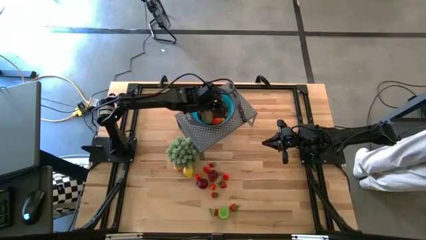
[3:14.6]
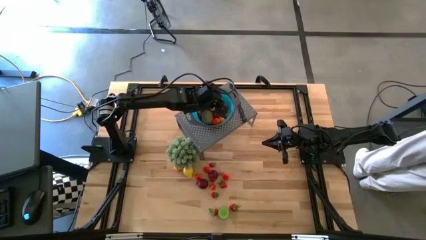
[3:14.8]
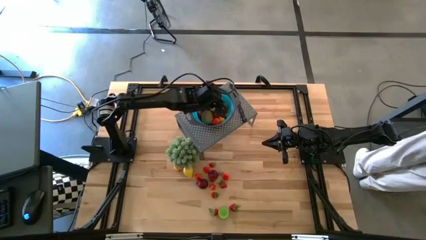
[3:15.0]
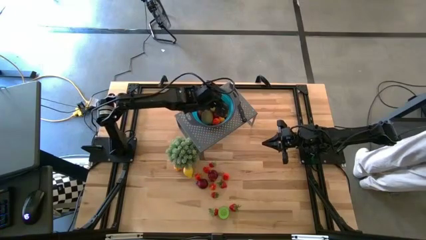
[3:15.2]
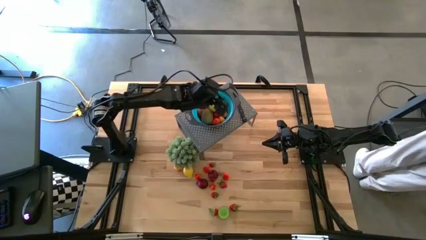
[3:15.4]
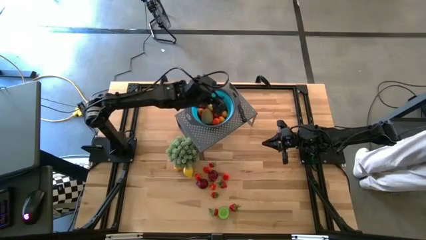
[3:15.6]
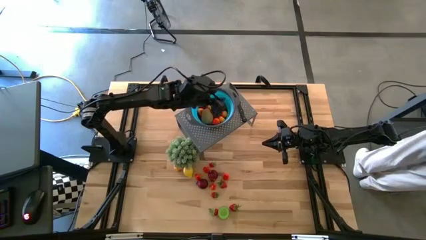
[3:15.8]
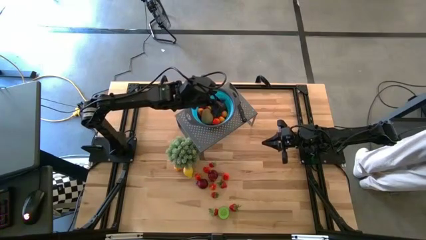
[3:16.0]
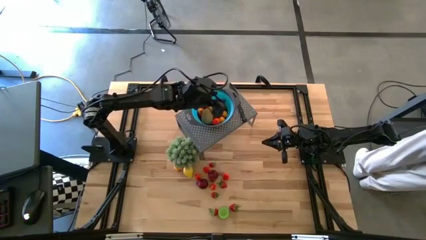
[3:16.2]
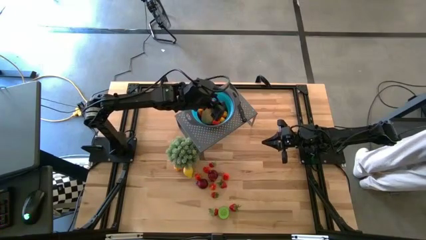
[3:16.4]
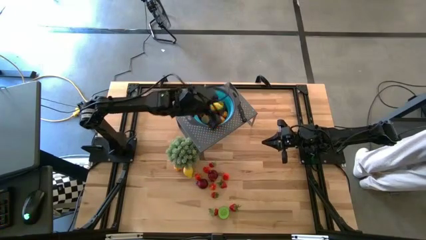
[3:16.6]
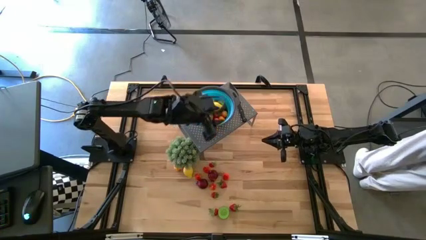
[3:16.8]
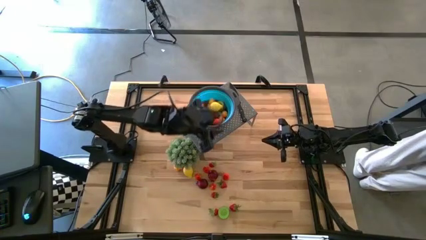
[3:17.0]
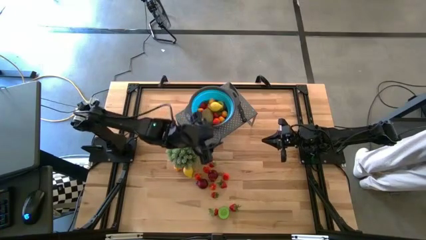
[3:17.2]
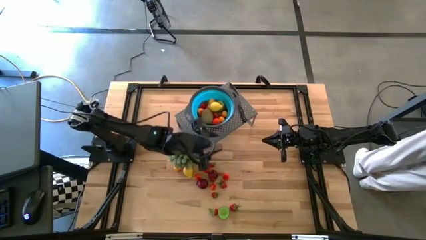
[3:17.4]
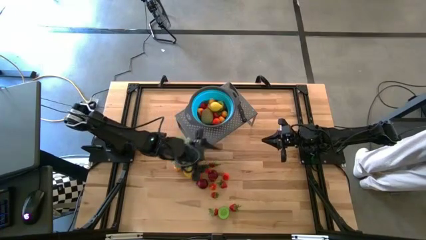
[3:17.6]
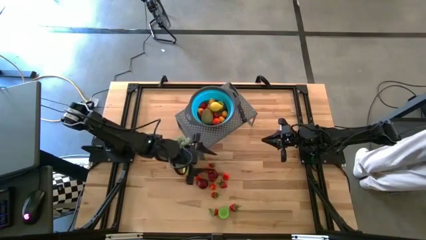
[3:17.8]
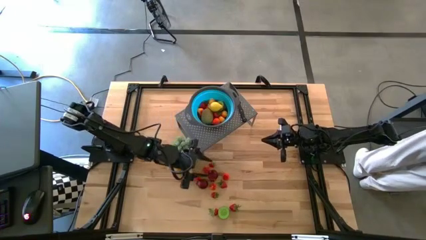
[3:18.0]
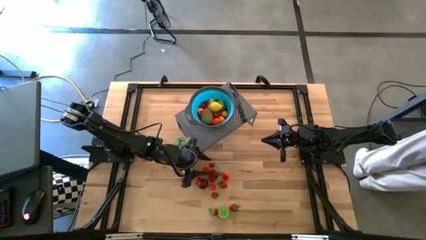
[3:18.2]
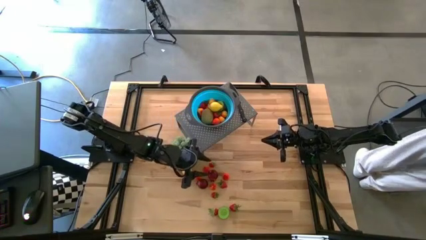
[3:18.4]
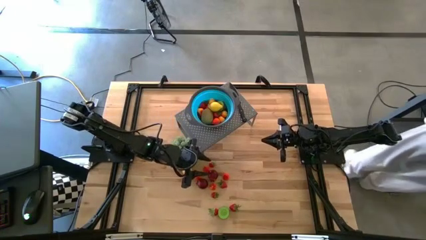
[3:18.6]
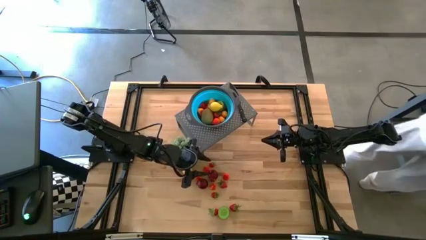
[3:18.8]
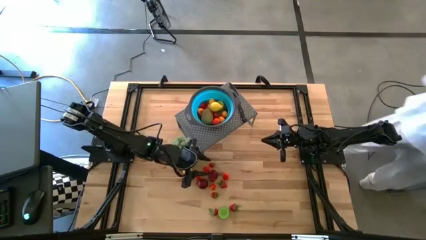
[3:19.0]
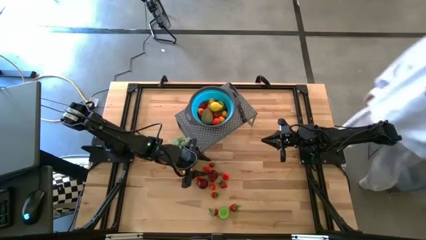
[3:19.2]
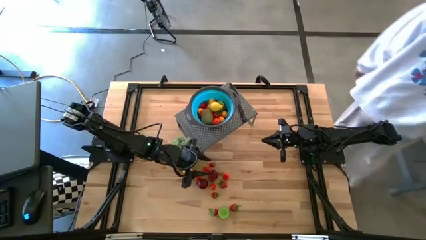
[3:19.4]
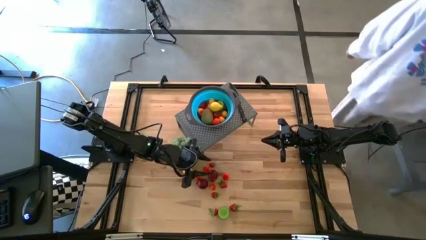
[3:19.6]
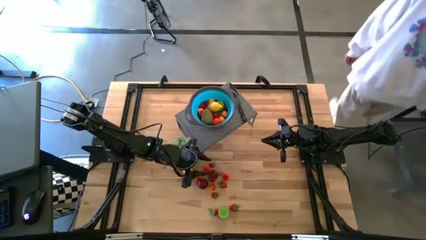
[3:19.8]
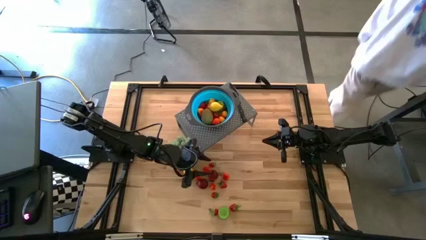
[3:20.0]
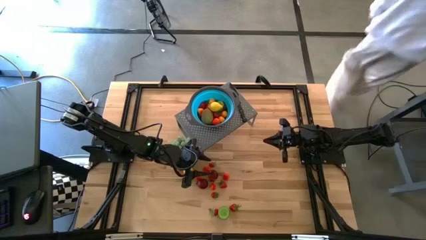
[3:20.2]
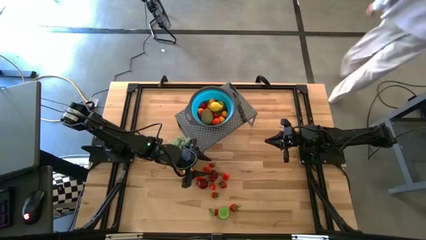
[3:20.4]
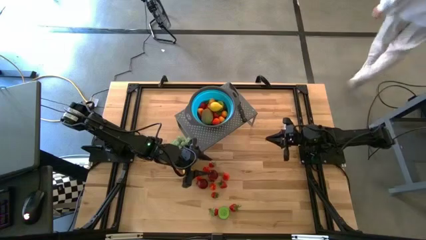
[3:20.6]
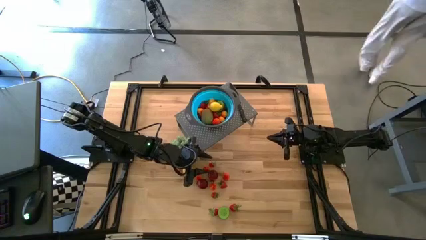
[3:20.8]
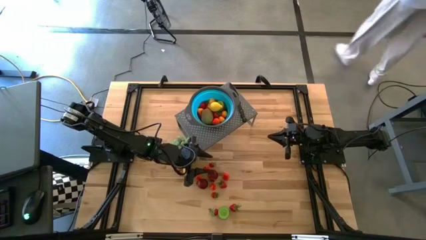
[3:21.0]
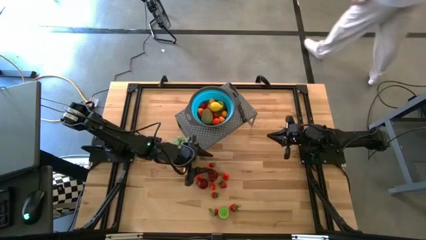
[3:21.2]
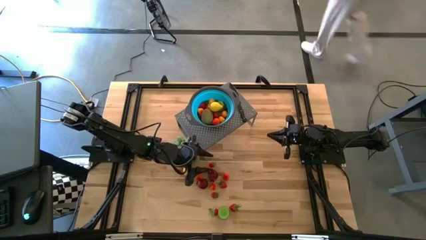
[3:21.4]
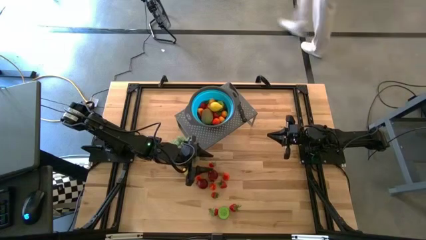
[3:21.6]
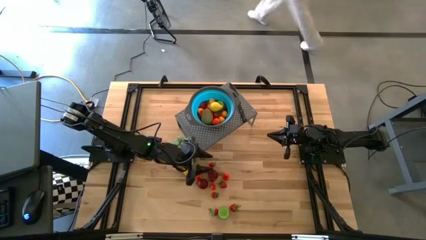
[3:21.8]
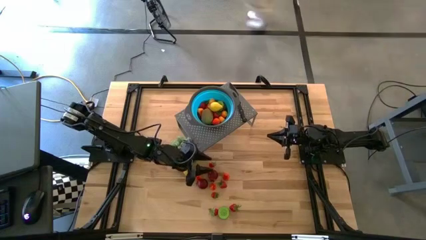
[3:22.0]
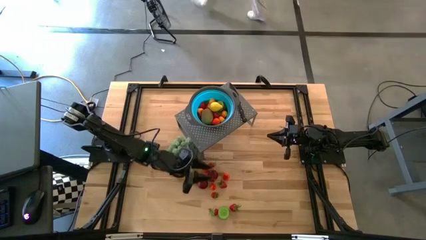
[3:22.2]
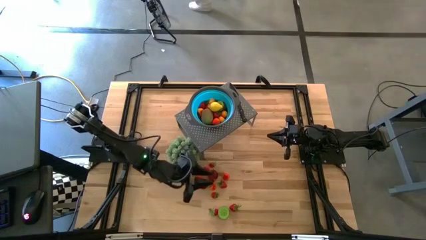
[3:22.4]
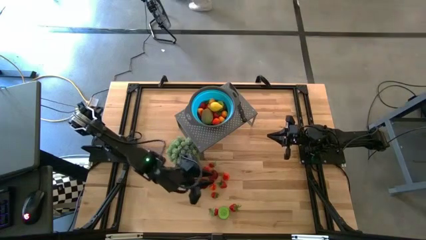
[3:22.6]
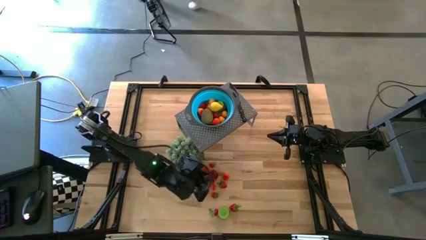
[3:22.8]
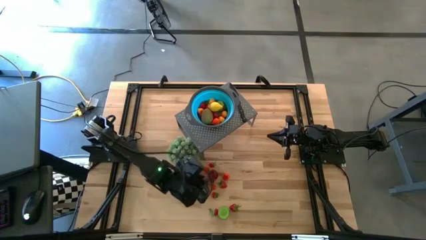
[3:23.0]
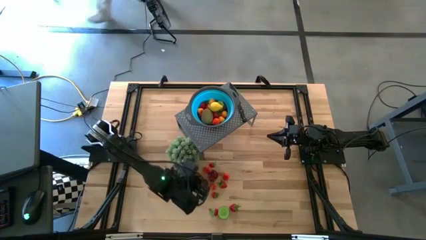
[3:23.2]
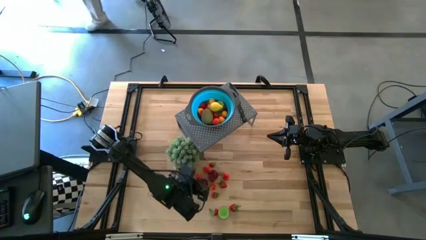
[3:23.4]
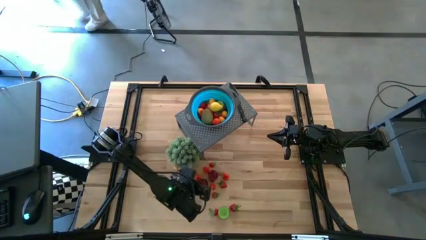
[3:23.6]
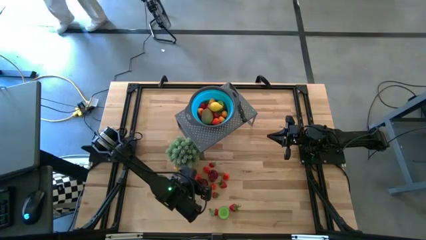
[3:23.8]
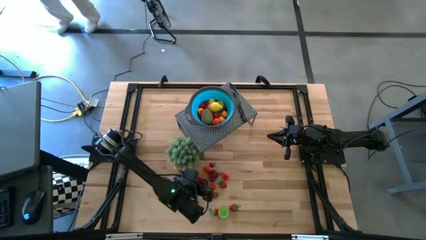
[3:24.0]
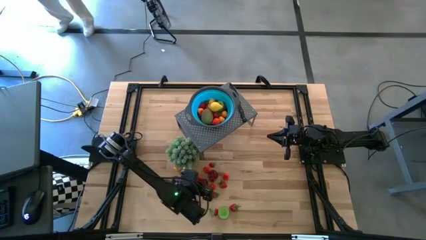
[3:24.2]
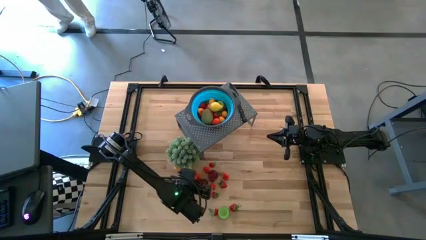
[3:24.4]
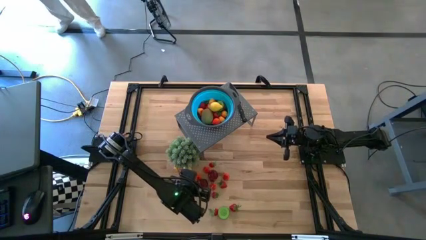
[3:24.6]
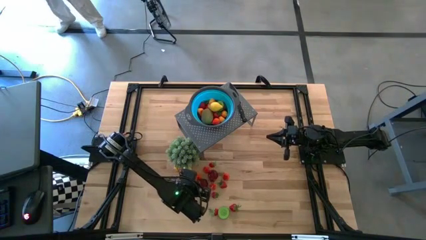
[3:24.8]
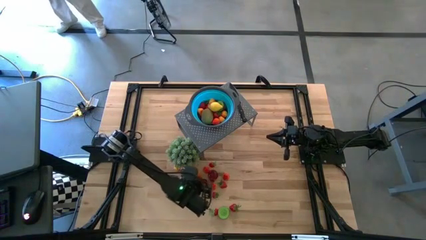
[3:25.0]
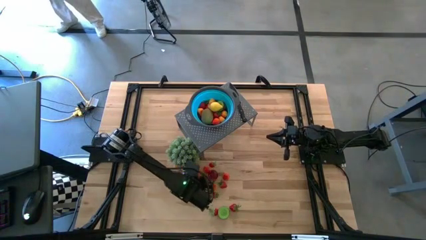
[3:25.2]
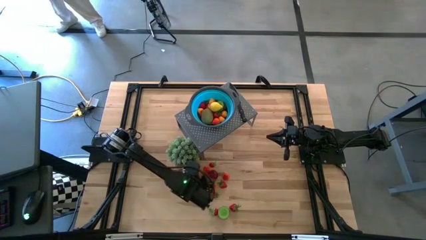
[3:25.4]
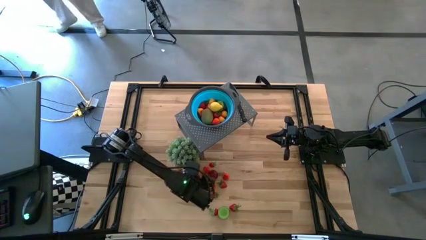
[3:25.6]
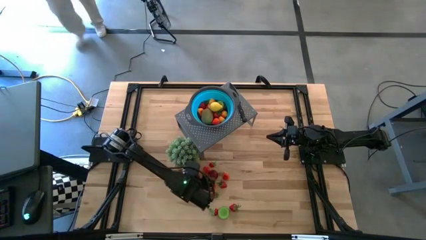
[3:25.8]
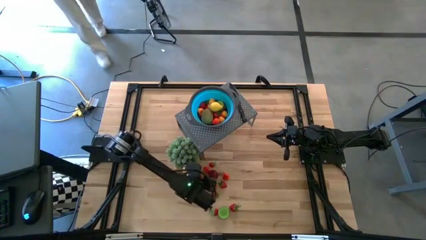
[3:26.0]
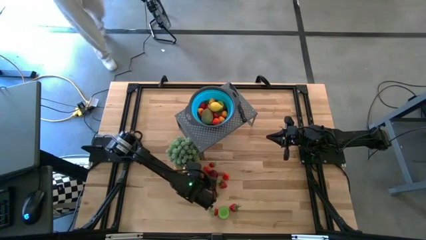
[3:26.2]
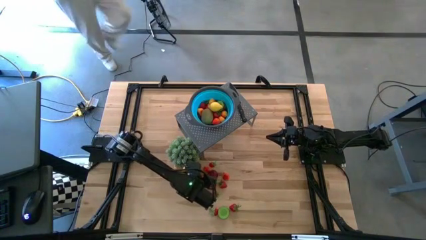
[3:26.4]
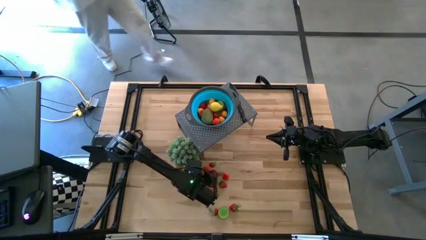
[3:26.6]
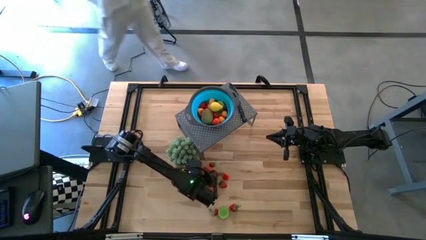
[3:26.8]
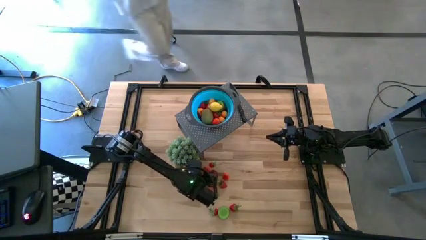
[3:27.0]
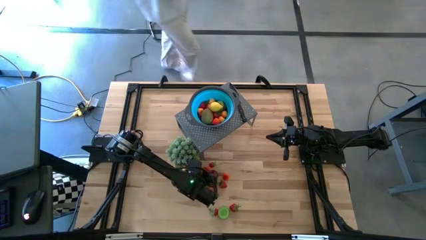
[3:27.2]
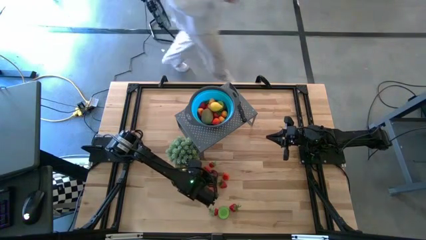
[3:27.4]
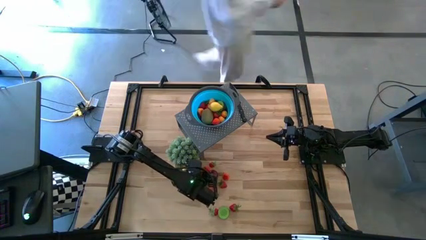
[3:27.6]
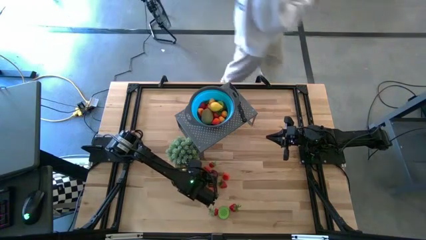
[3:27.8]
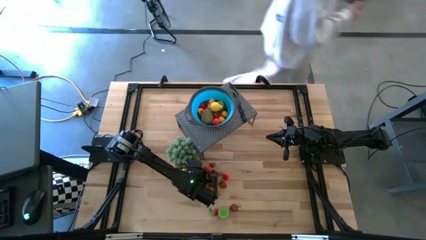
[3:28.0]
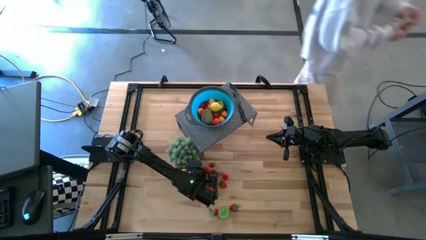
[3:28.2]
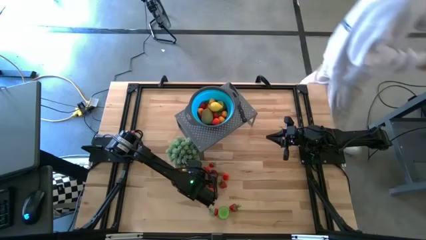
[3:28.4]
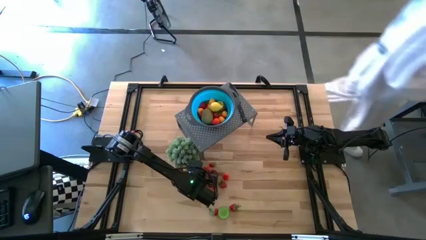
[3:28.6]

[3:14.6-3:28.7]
Task: Pick & Place Fruit
Put the pear into the blue strainer bowl on the shelf
